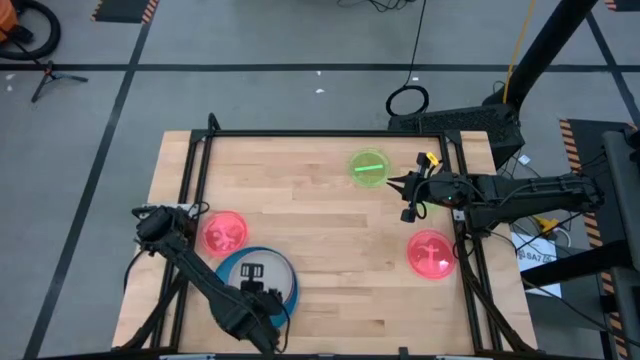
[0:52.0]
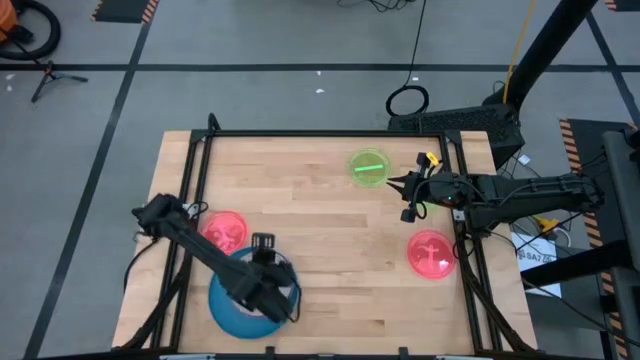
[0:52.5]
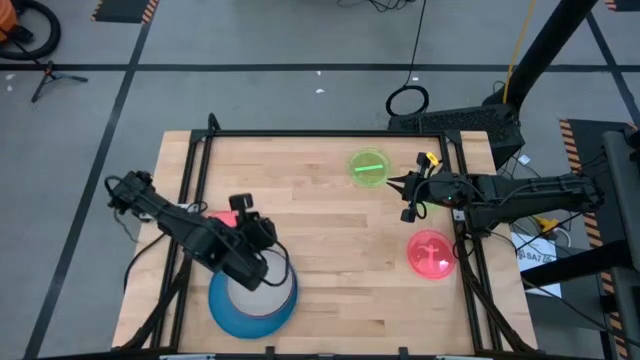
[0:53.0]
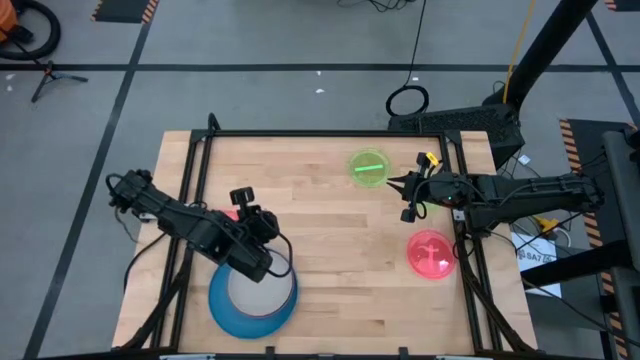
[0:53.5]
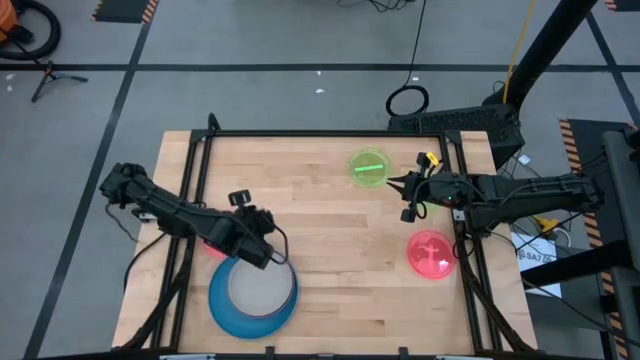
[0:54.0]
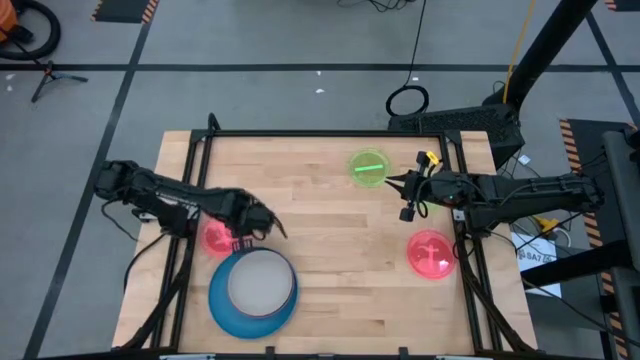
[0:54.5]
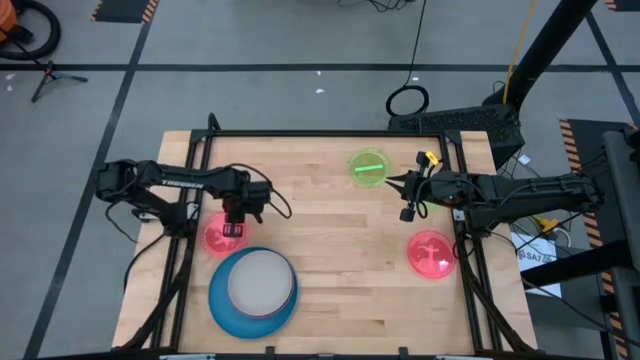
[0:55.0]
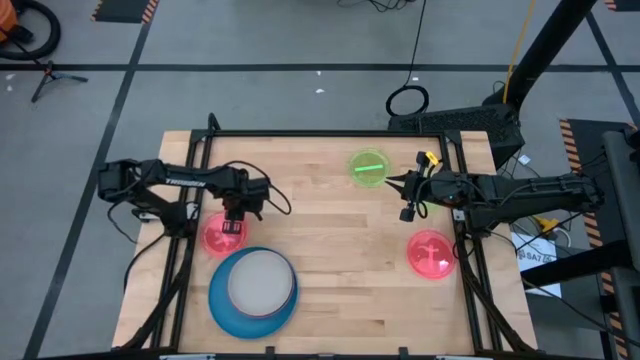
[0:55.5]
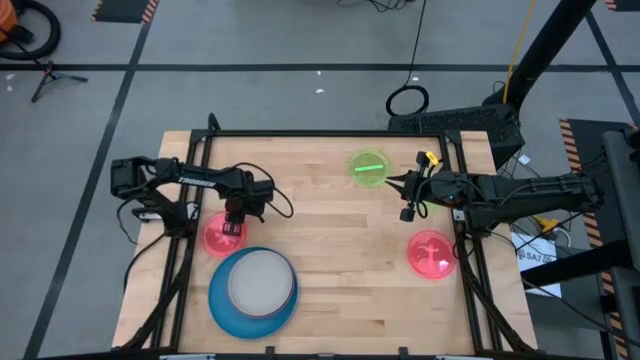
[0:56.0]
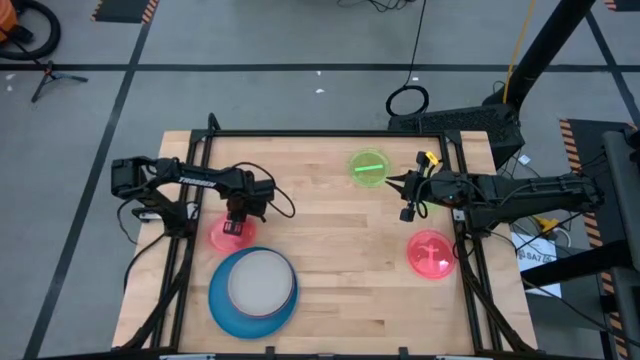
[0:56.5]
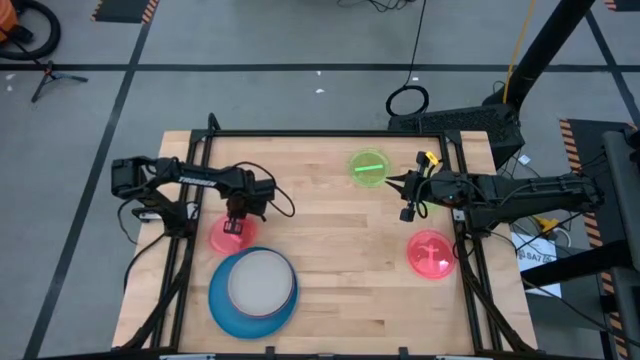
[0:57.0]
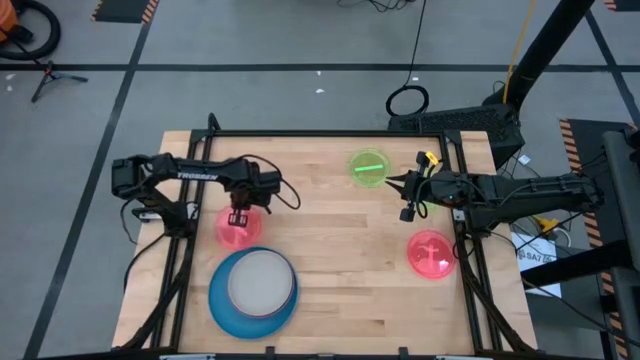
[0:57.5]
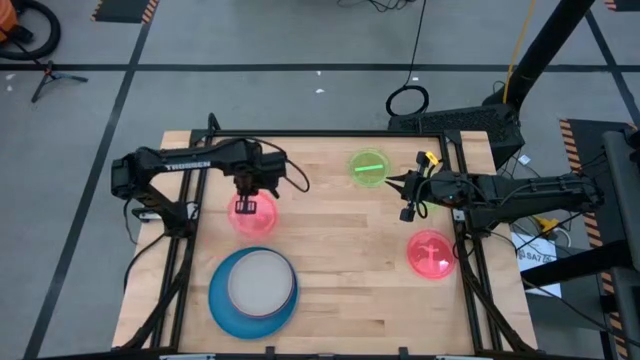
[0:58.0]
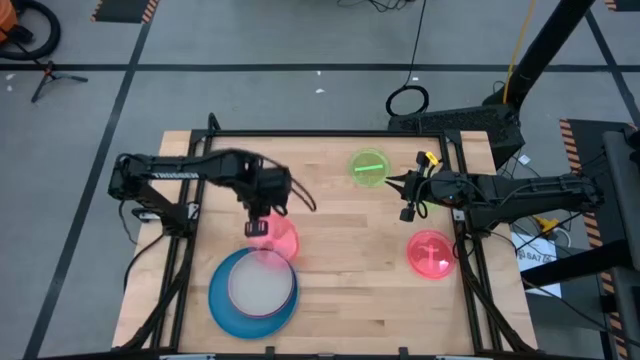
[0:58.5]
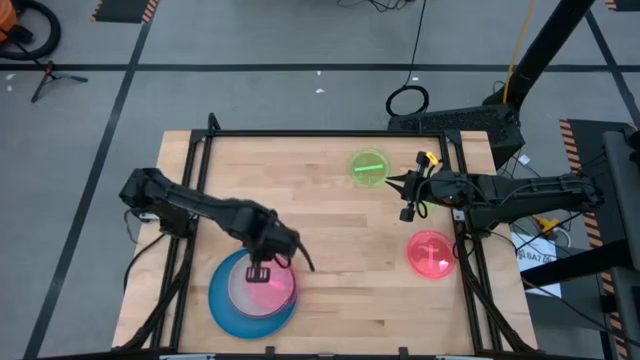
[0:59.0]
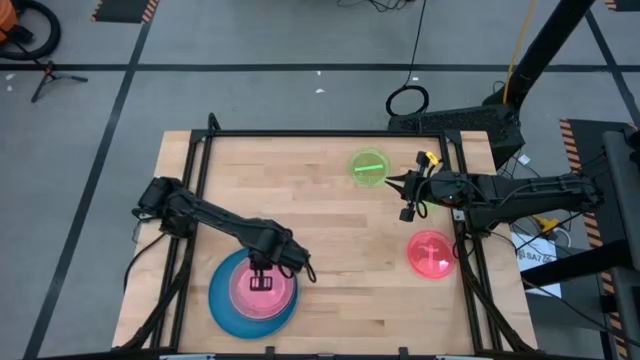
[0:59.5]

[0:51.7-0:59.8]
Task: Stack plastic plates
Stack the left pink plate on the gray plate

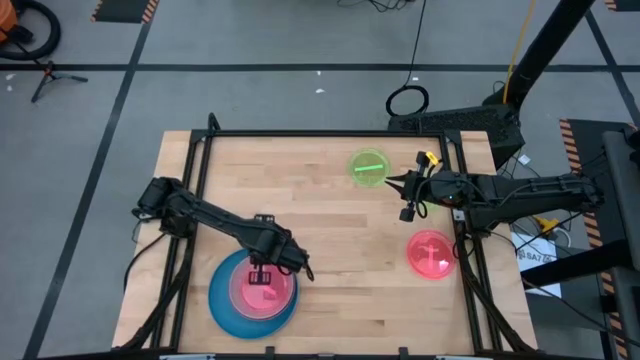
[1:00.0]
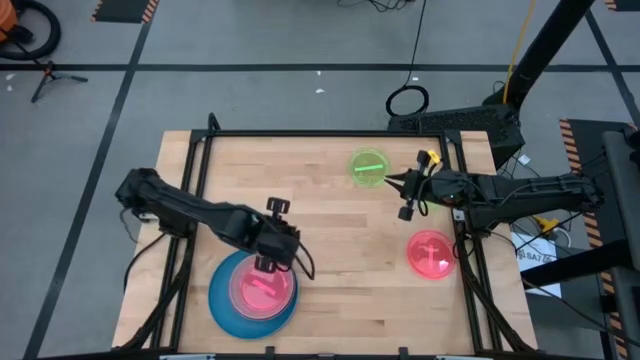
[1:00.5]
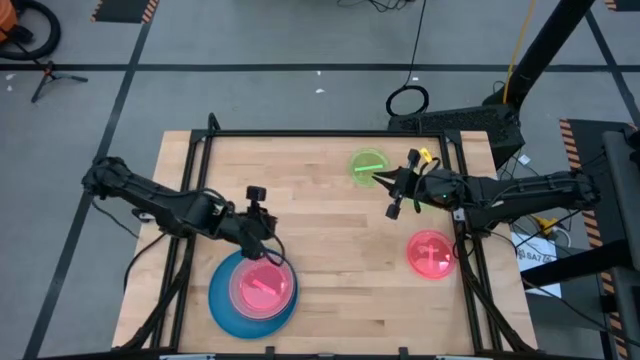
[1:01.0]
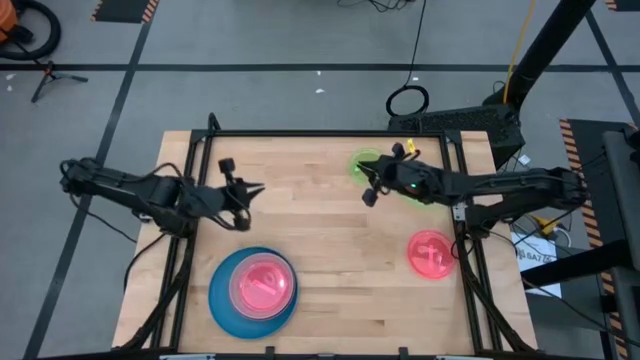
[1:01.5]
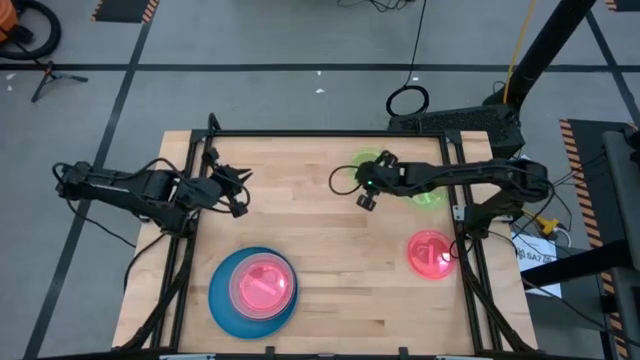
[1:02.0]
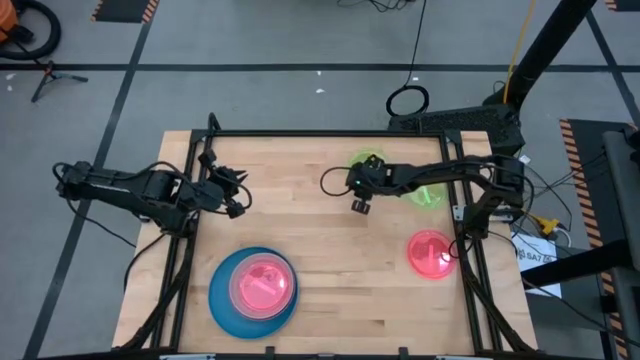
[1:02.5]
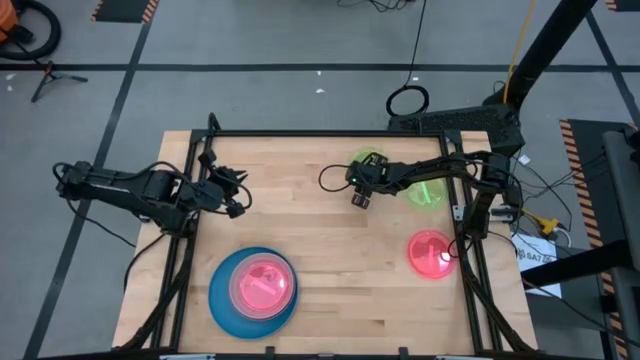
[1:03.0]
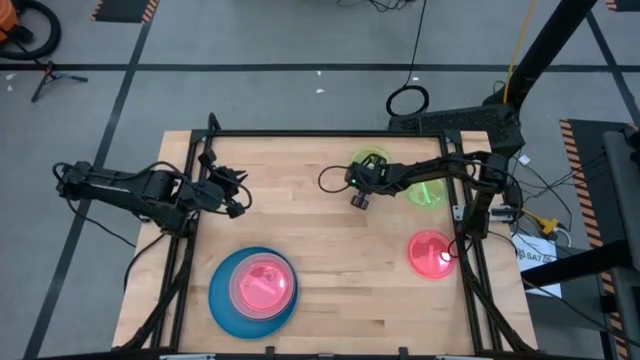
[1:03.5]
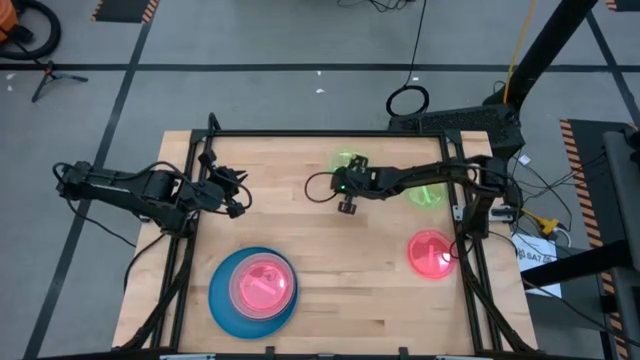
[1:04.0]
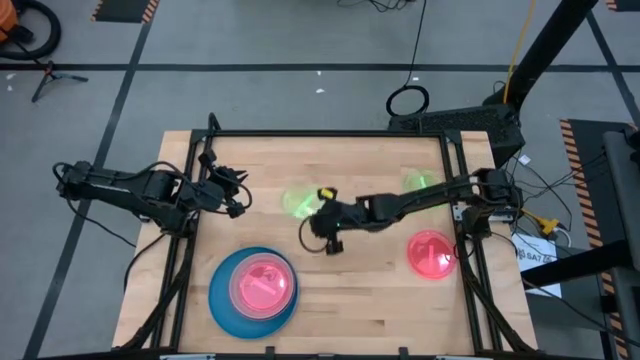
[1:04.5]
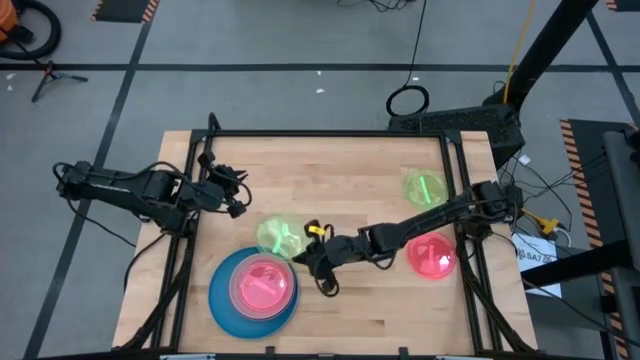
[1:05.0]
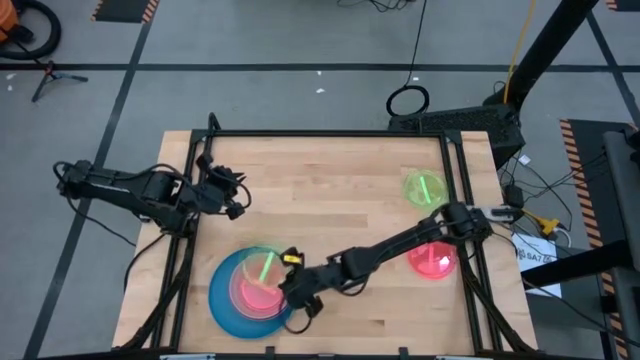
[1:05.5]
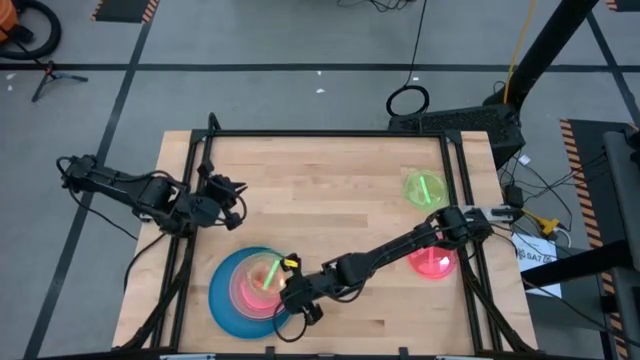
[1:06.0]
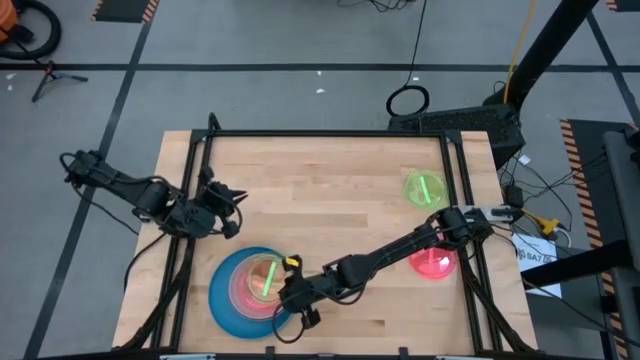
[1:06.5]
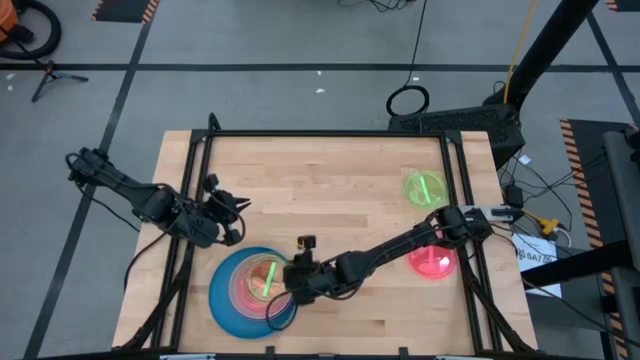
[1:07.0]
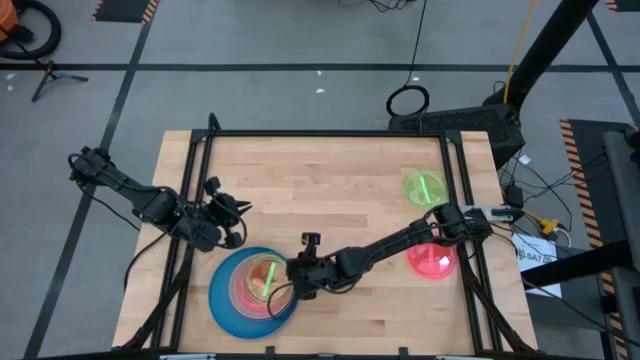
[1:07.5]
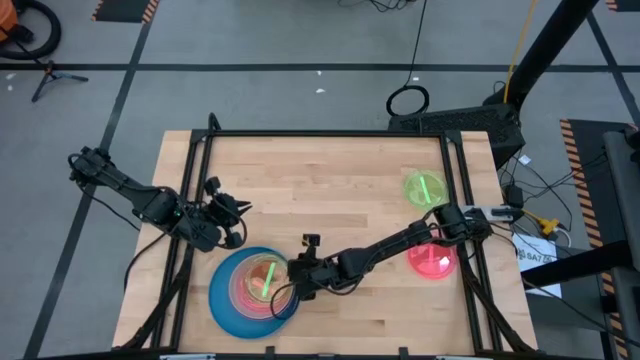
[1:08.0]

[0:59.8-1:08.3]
Stack the top green plate on the left pink plate

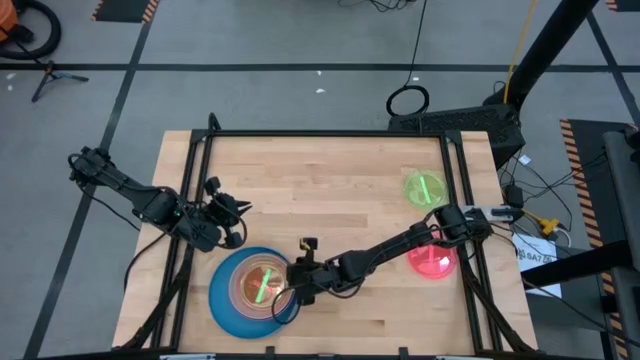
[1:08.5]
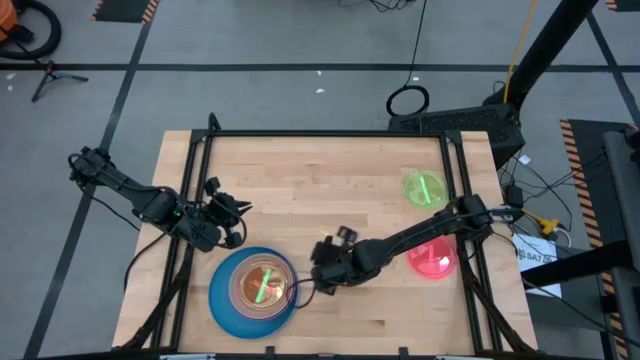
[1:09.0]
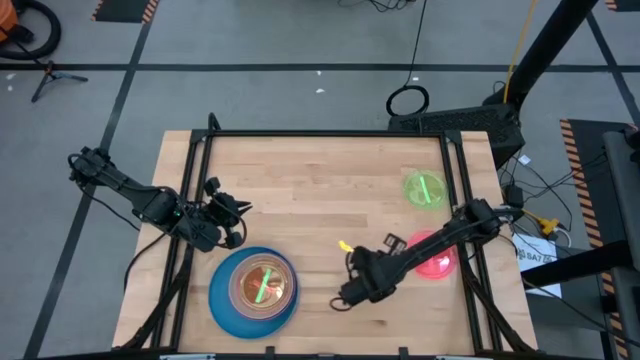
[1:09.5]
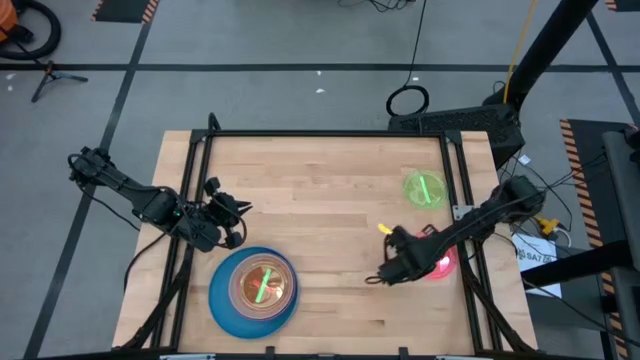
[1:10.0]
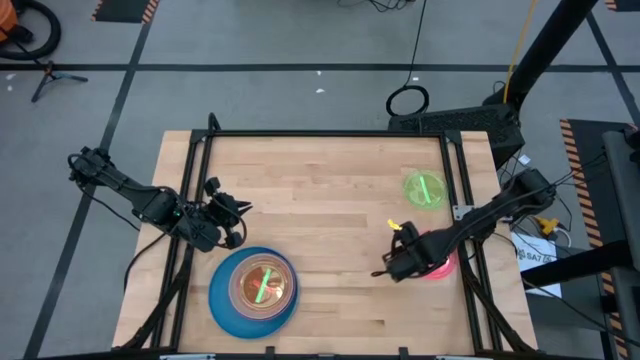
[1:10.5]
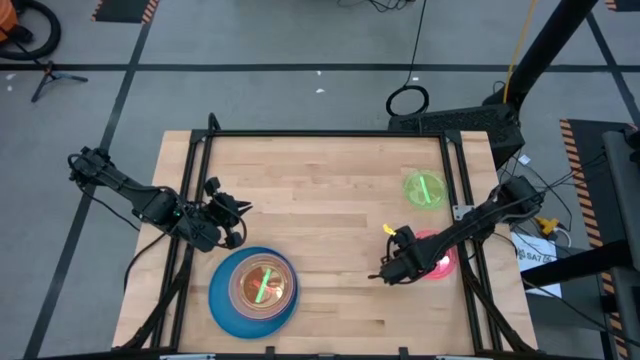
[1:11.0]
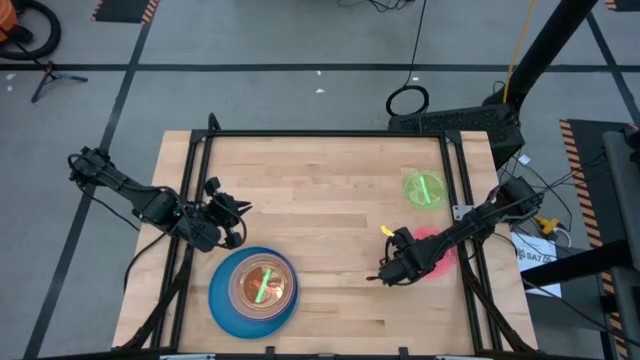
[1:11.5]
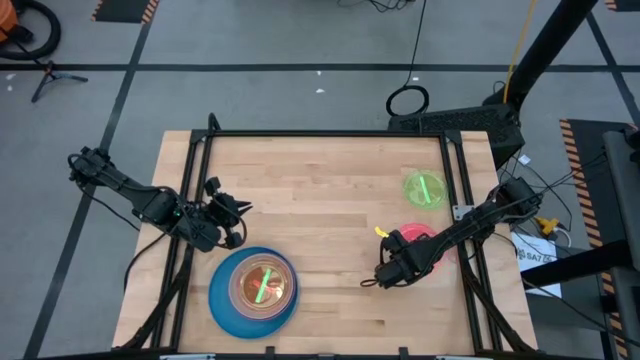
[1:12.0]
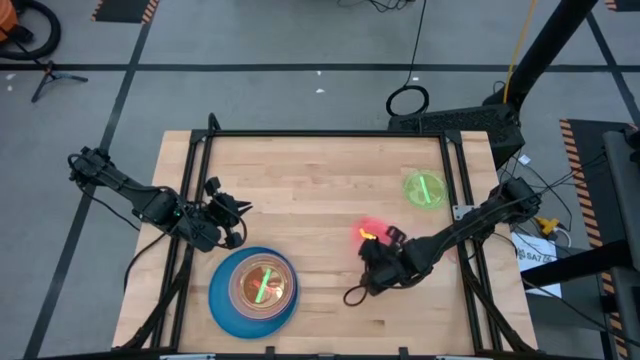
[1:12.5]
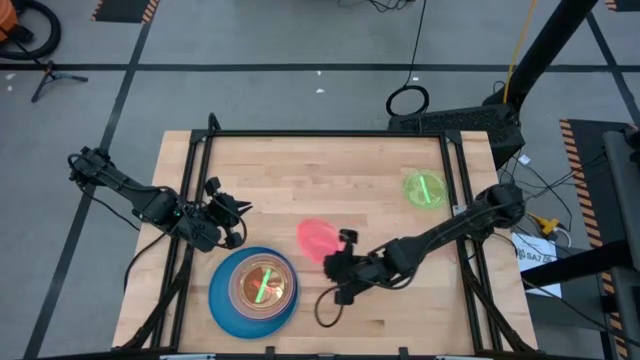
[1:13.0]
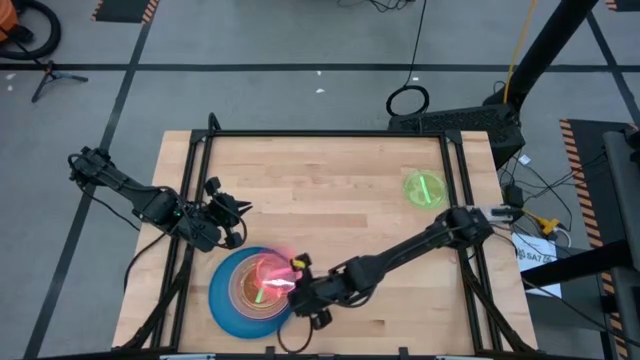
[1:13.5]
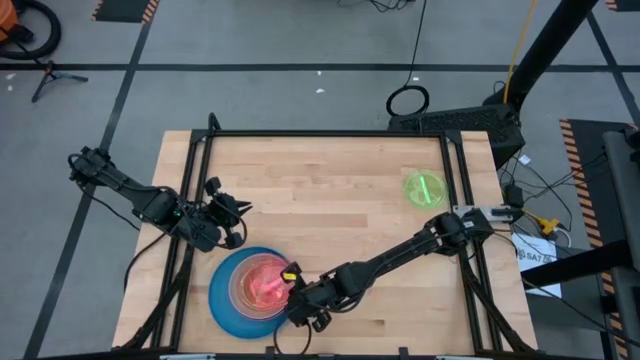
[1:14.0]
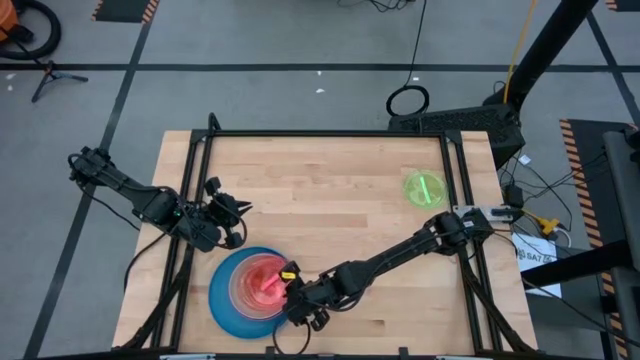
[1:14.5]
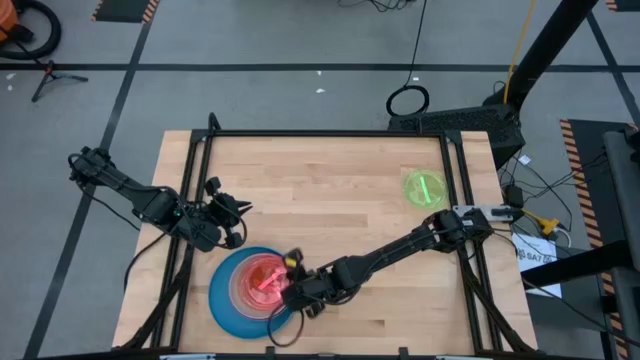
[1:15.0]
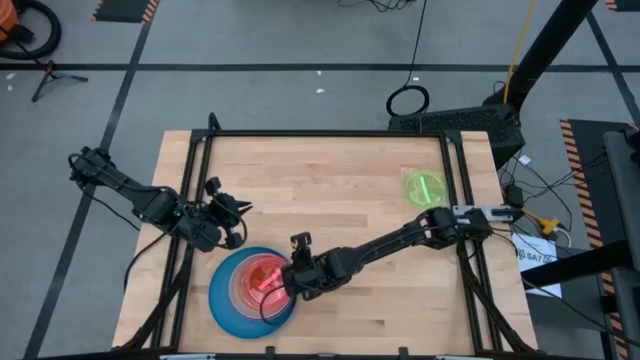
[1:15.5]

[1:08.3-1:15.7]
Stack the pink plate on the bottom green plate
